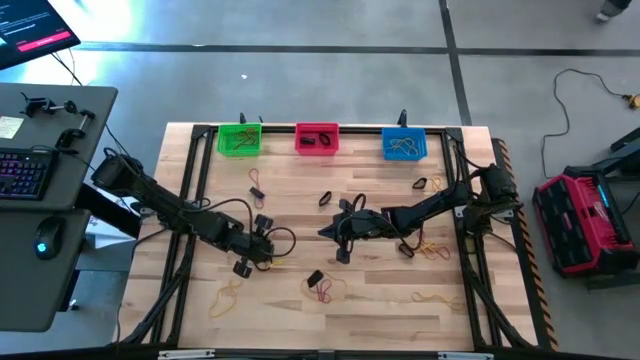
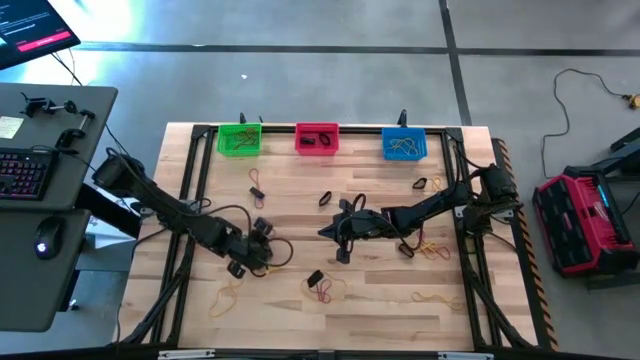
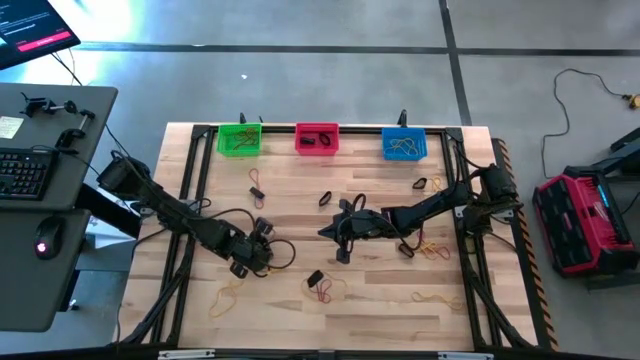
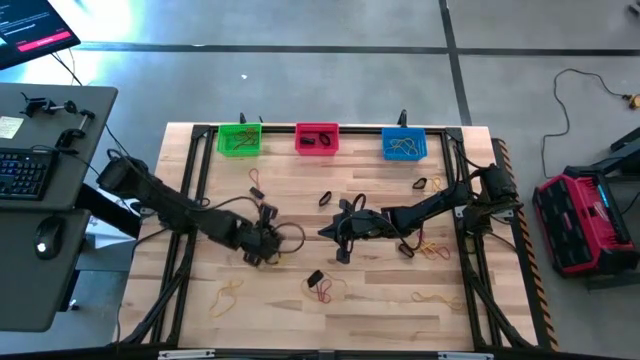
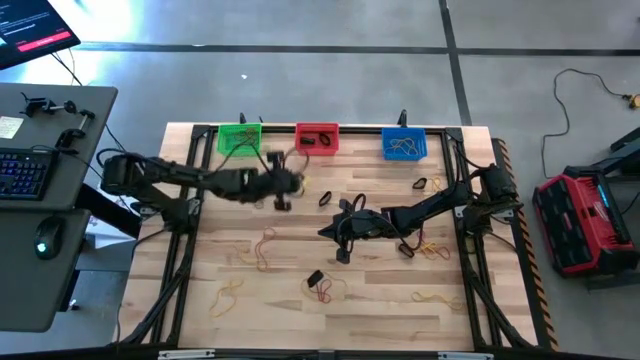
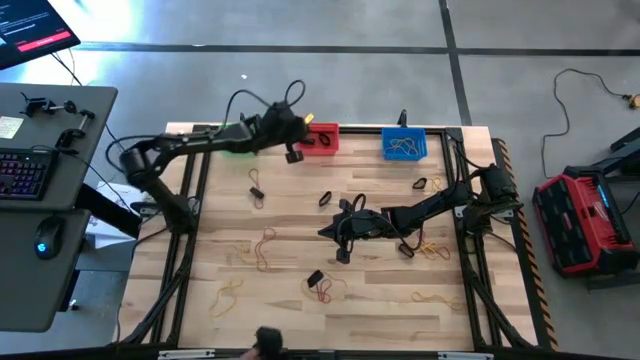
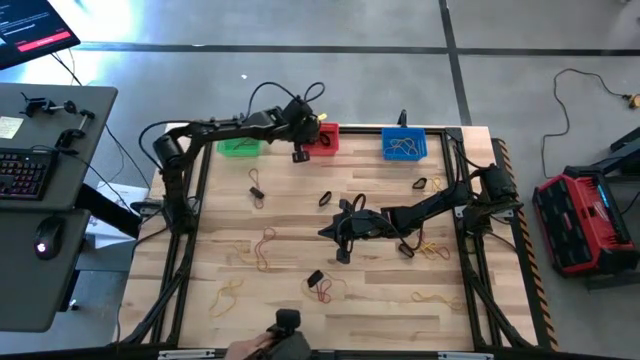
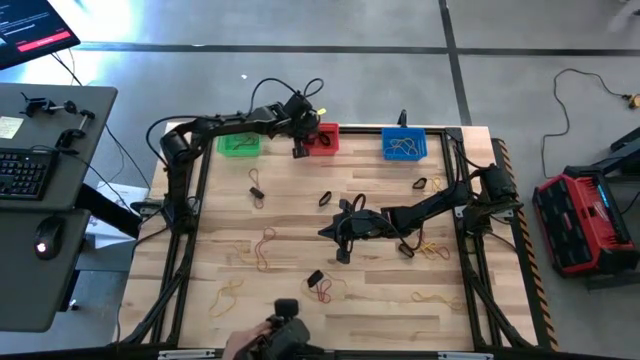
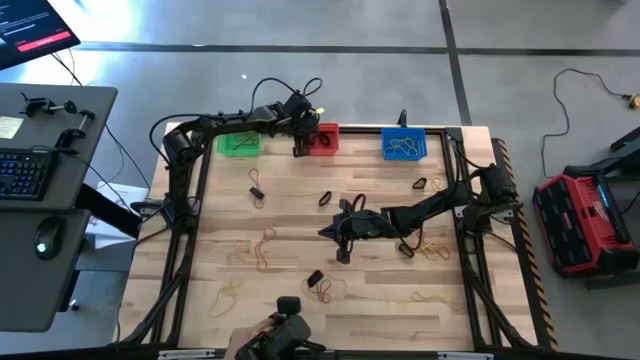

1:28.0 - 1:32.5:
Task: Sort rubber bands into baskets
Put the black rubber band into the red bin

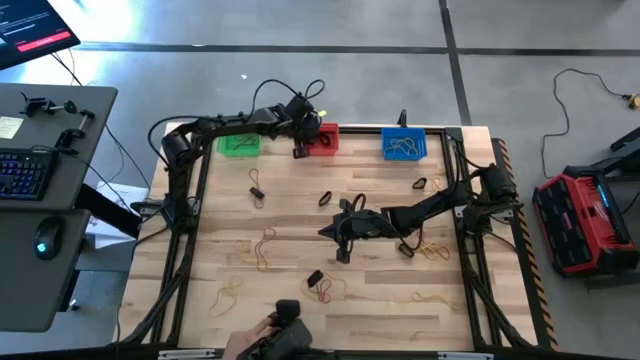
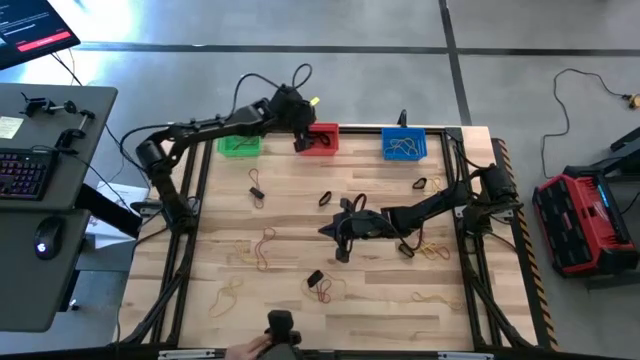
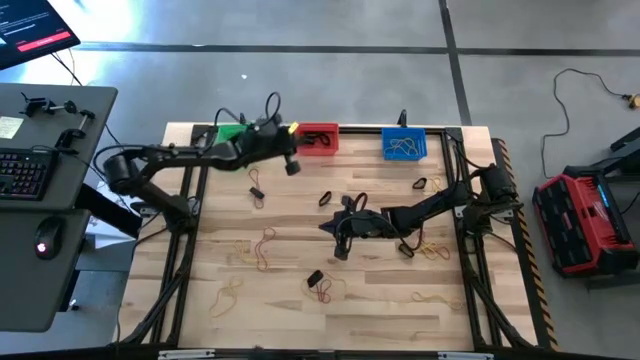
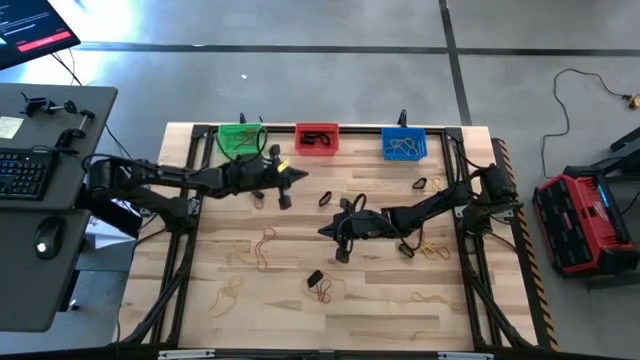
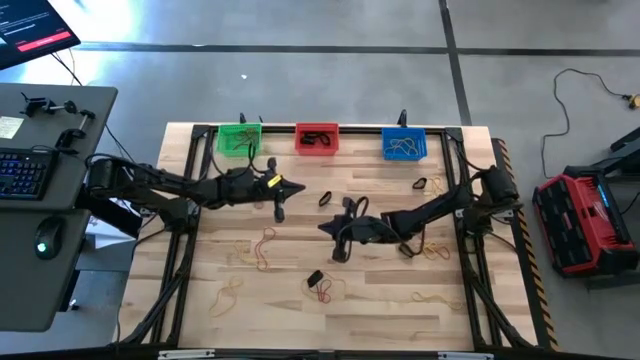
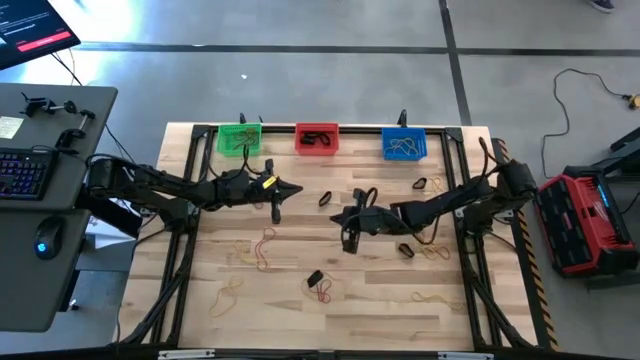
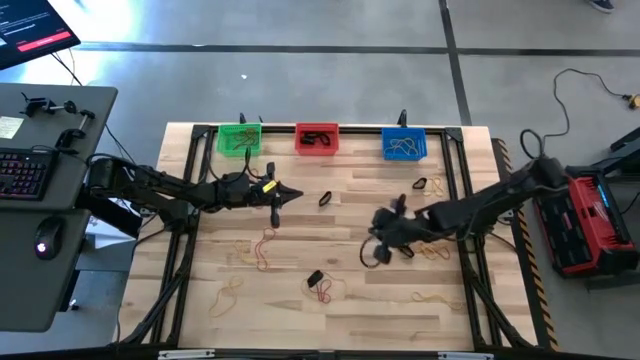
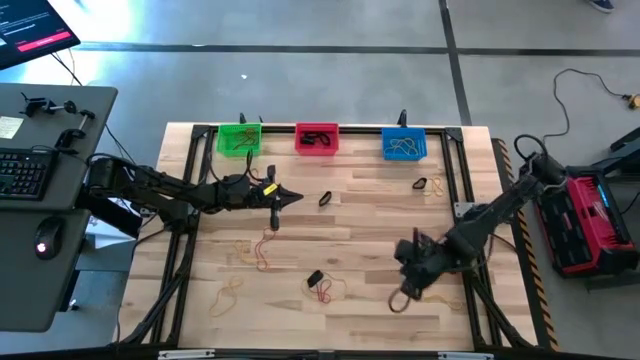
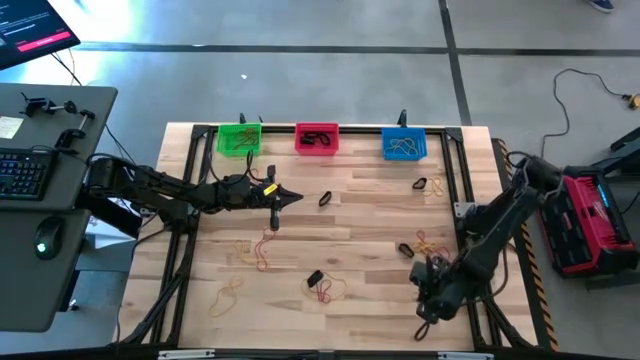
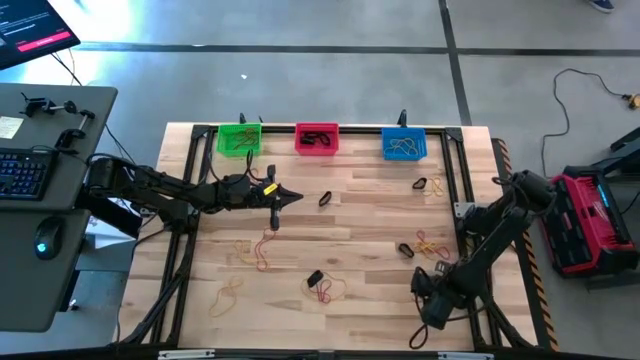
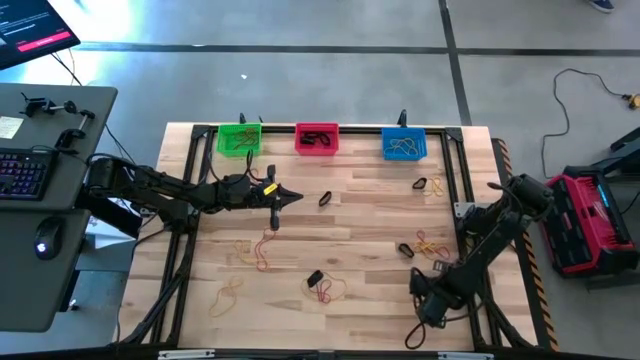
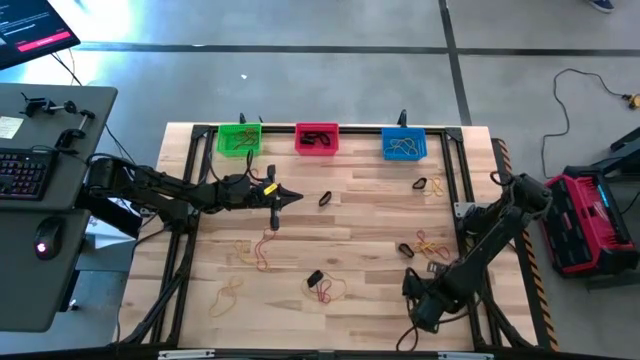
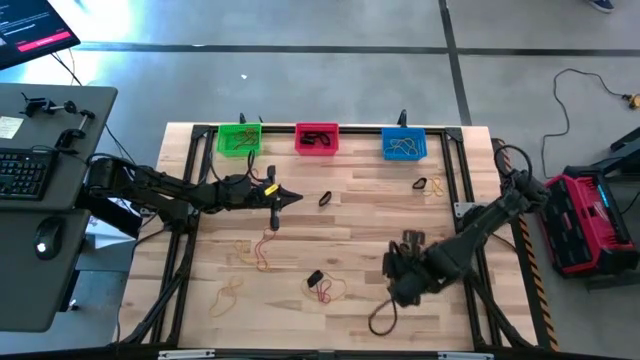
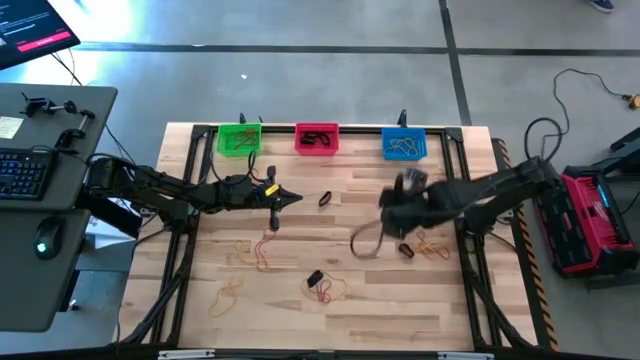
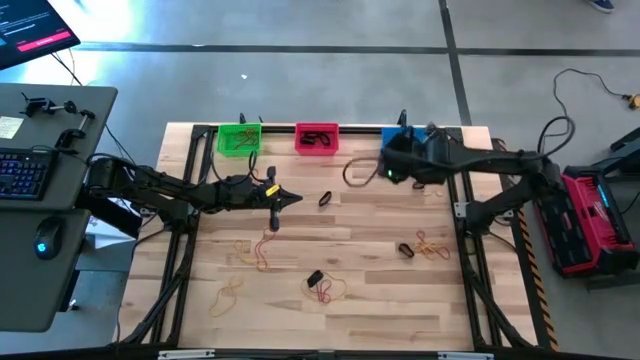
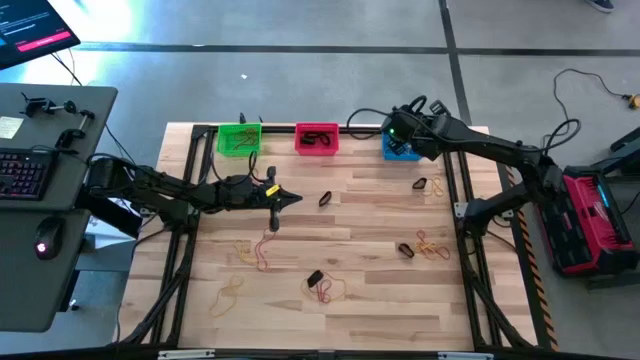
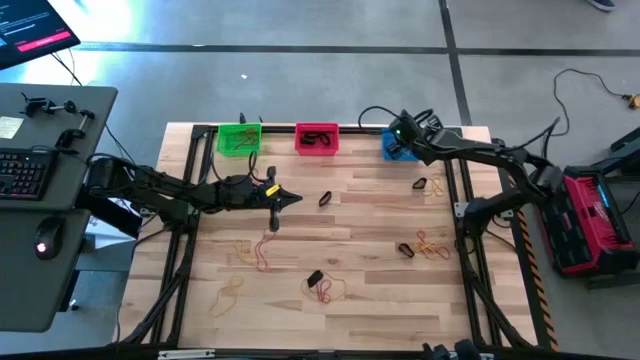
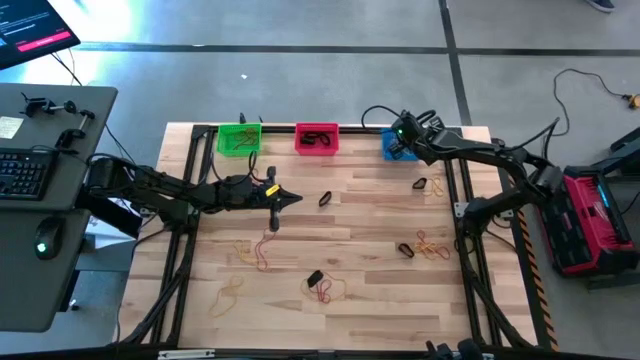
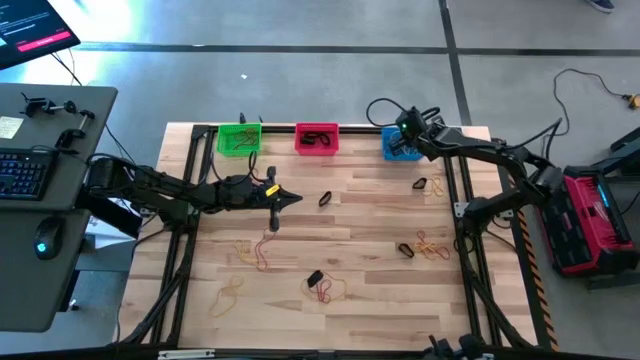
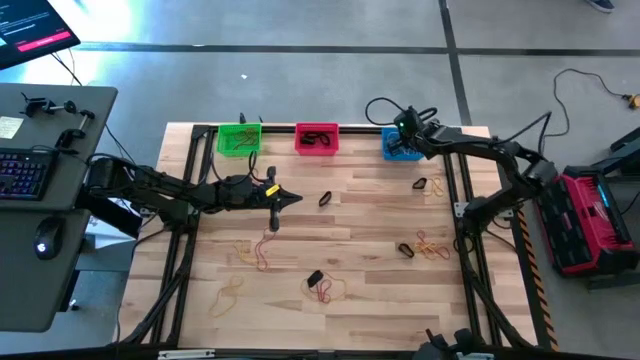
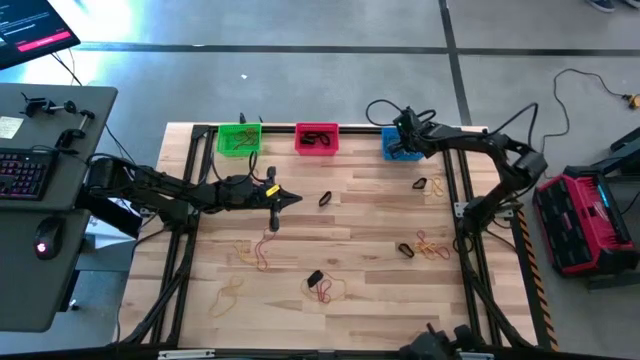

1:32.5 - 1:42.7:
Put the yellow rubber band into the blue bin

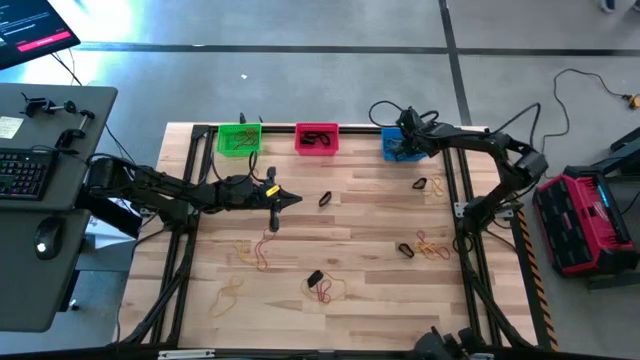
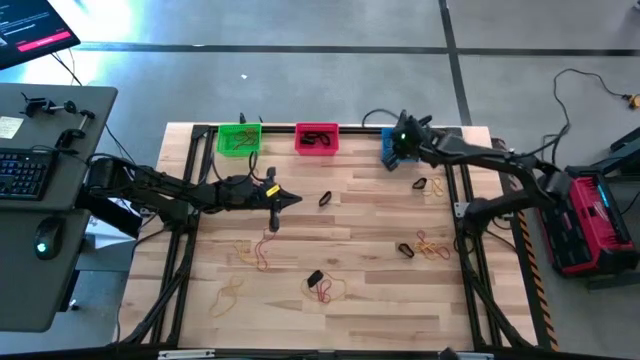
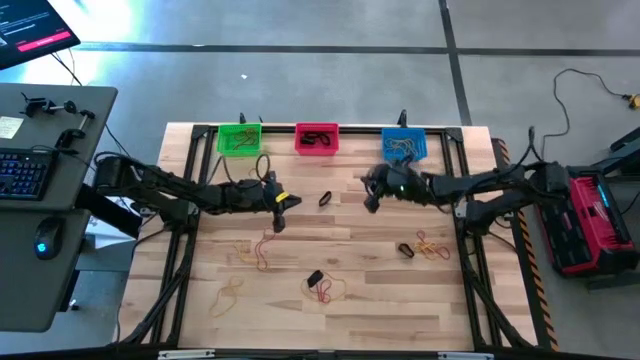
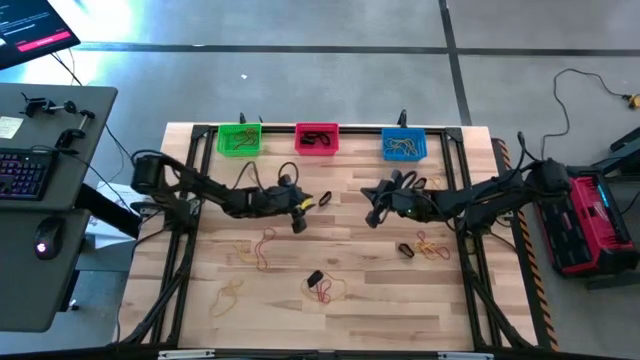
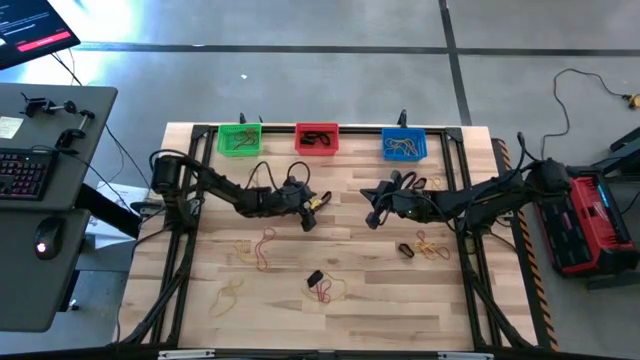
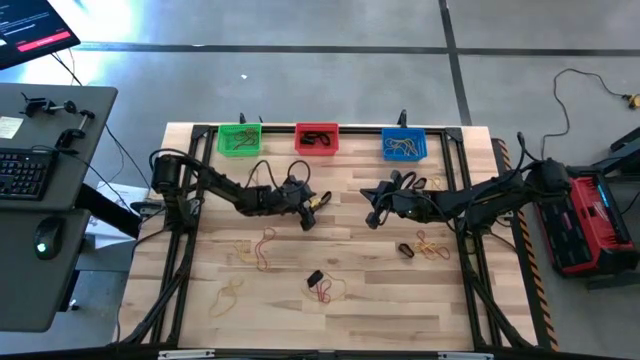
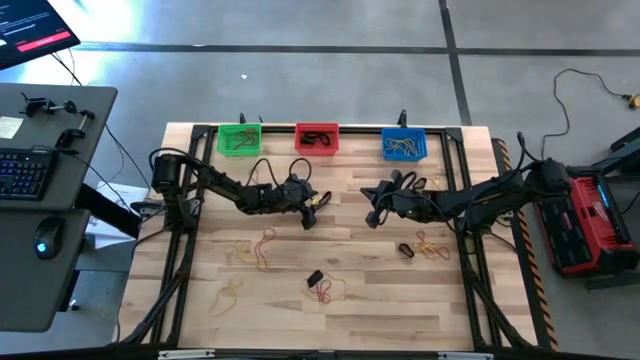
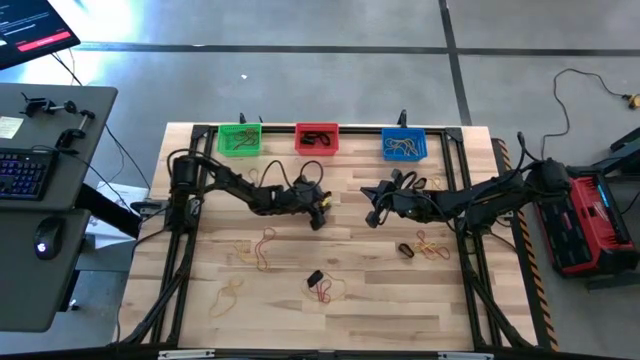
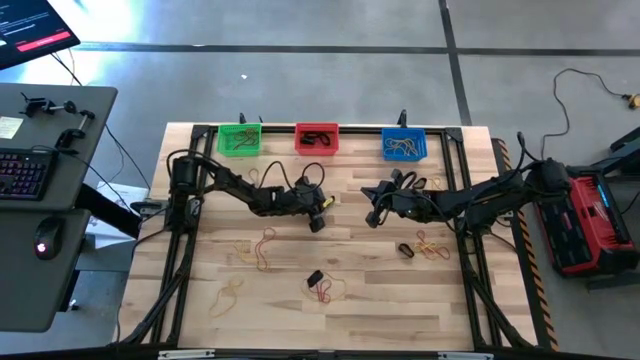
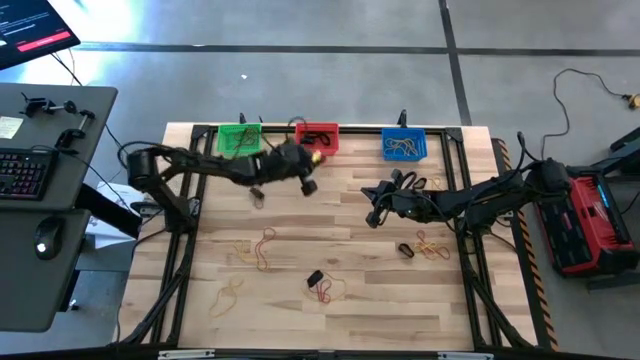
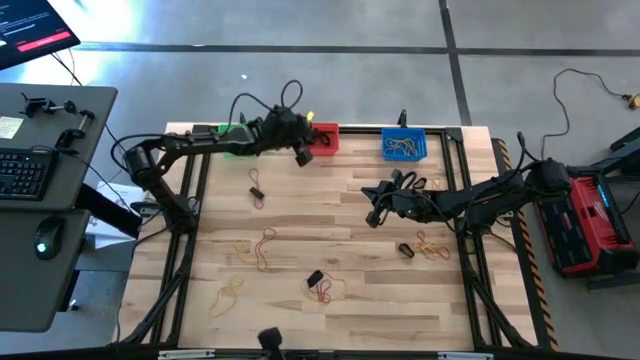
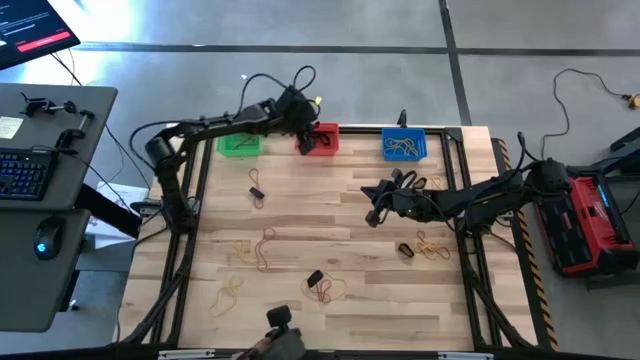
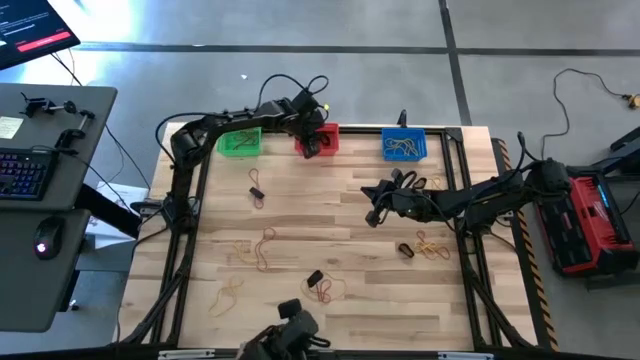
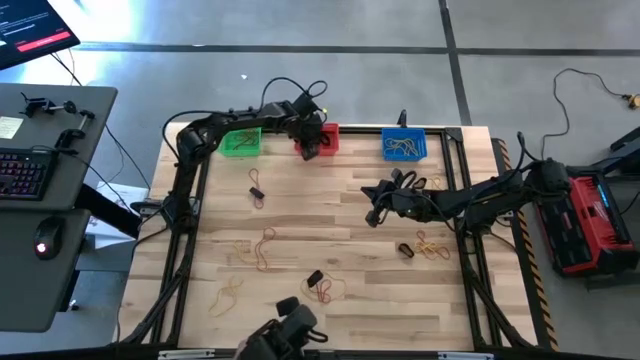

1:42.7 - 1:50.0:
Put the black rubber band into the red bin
